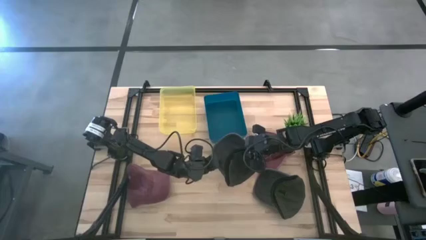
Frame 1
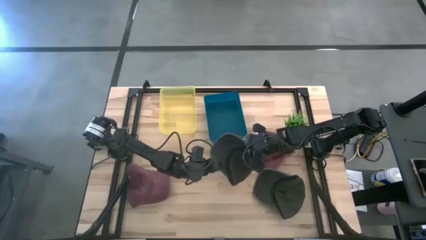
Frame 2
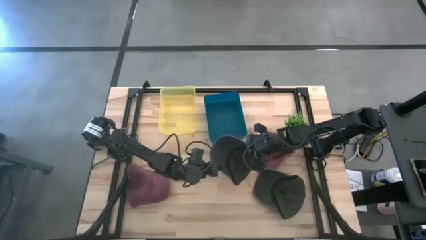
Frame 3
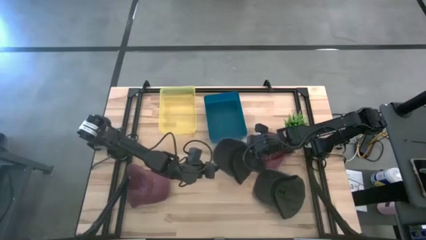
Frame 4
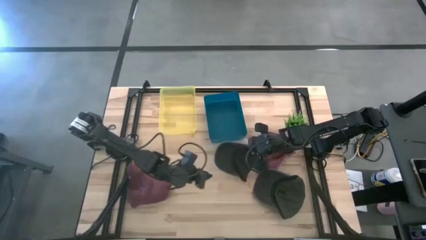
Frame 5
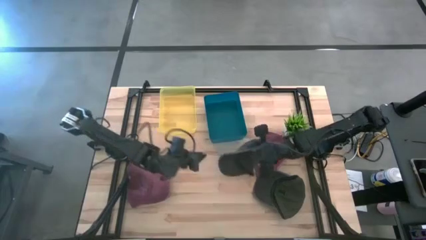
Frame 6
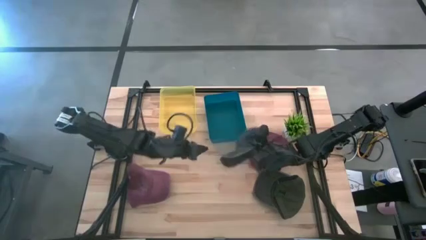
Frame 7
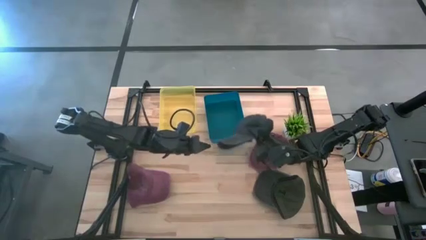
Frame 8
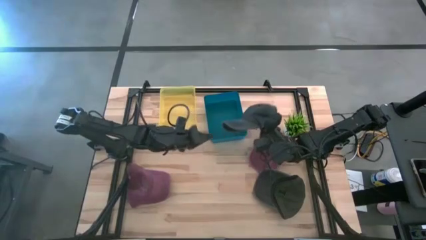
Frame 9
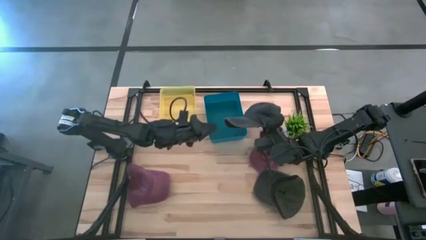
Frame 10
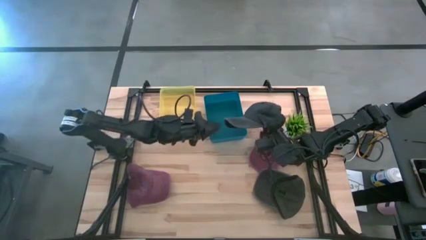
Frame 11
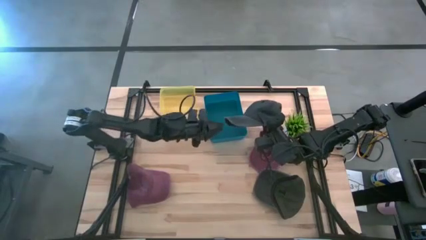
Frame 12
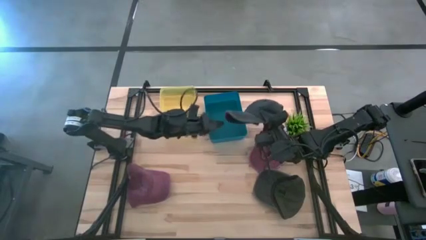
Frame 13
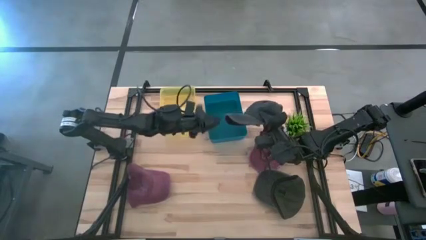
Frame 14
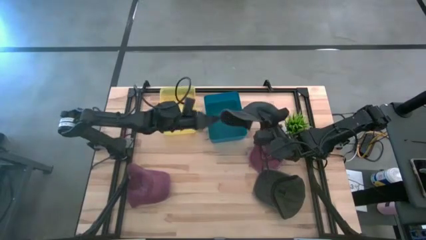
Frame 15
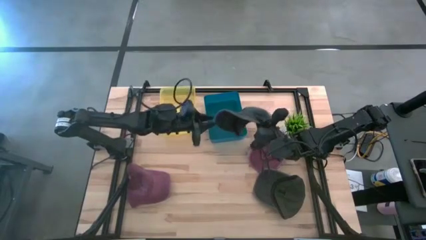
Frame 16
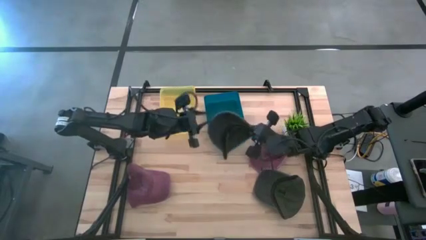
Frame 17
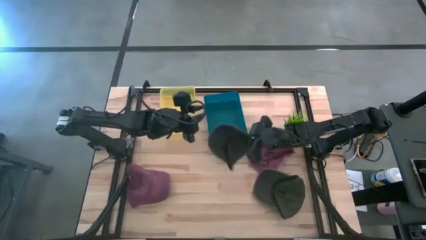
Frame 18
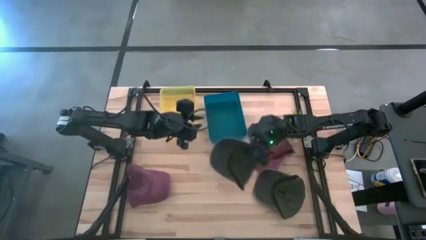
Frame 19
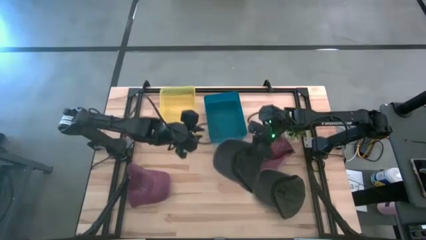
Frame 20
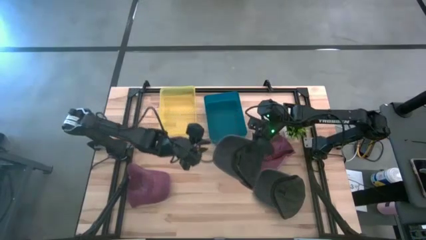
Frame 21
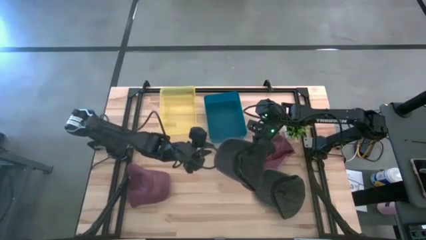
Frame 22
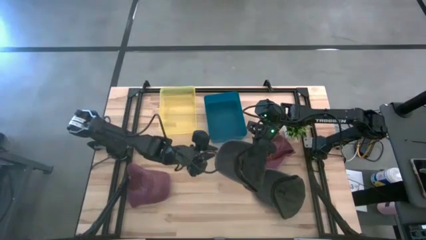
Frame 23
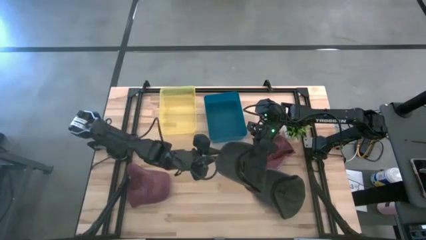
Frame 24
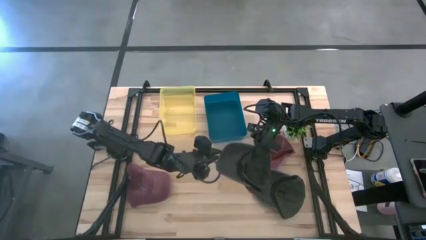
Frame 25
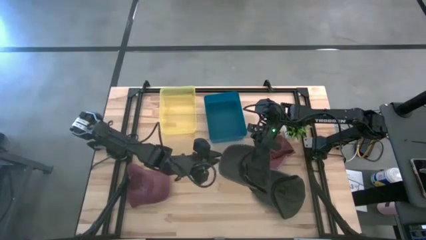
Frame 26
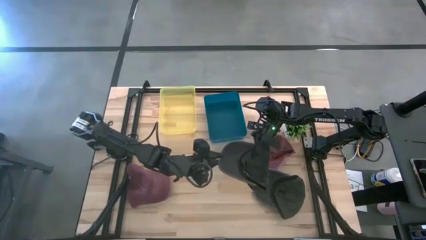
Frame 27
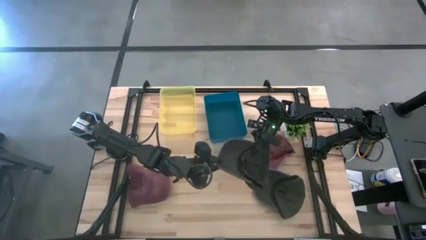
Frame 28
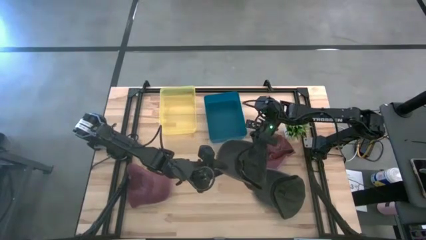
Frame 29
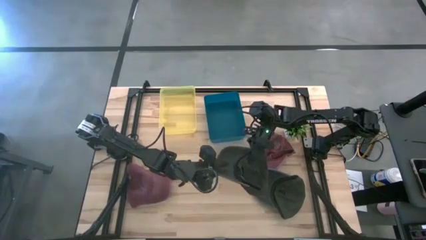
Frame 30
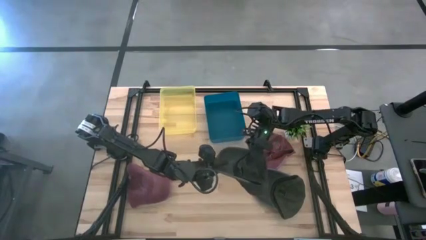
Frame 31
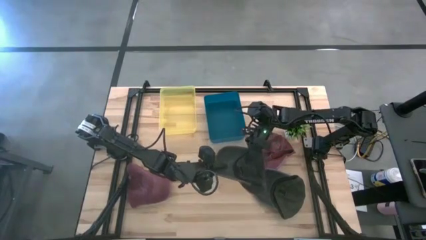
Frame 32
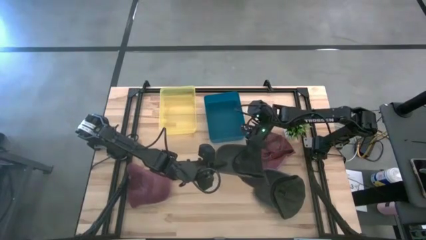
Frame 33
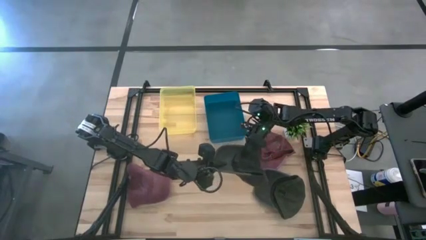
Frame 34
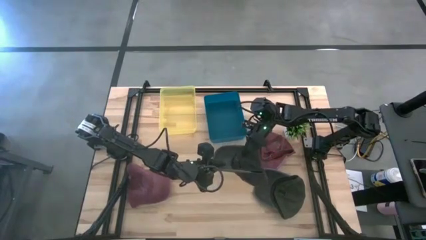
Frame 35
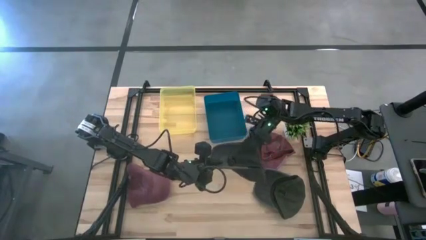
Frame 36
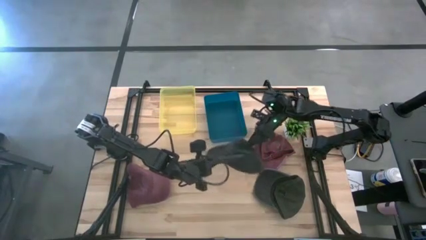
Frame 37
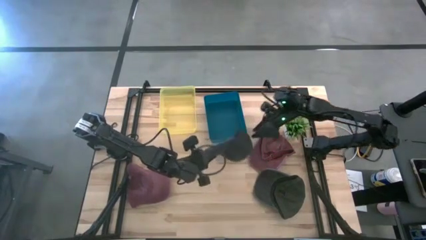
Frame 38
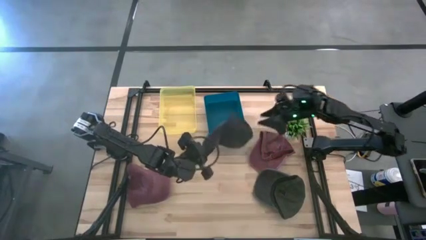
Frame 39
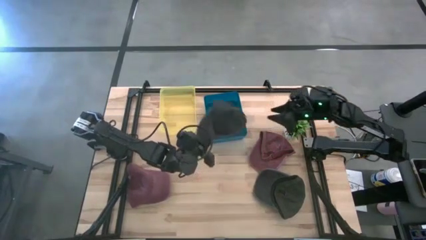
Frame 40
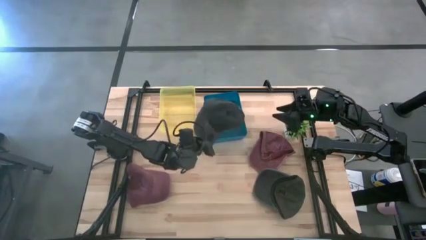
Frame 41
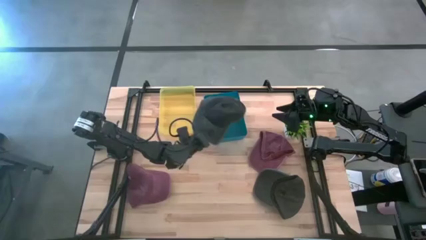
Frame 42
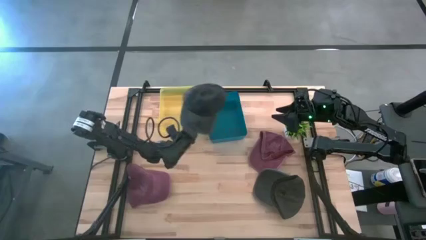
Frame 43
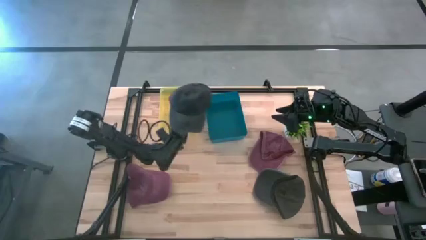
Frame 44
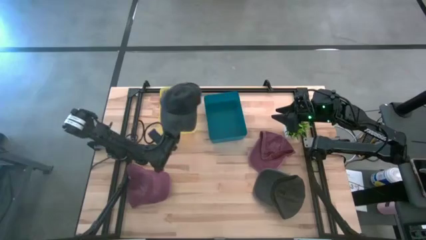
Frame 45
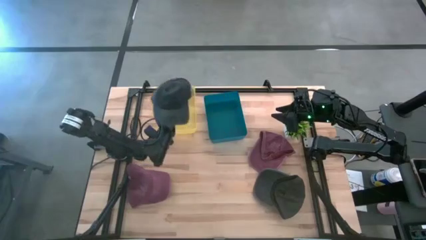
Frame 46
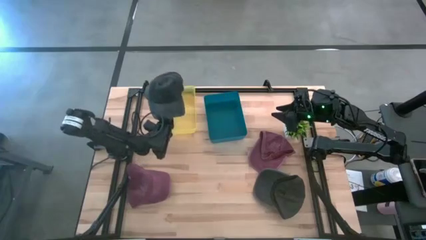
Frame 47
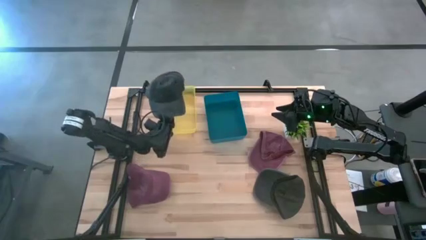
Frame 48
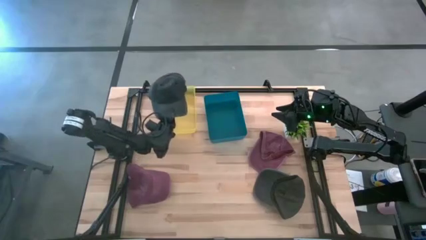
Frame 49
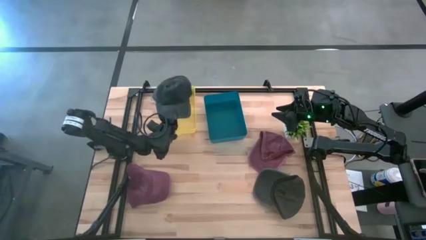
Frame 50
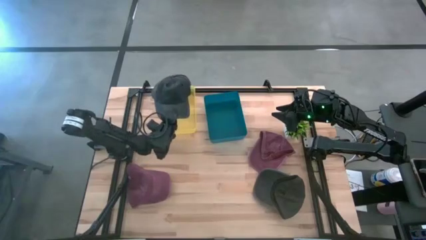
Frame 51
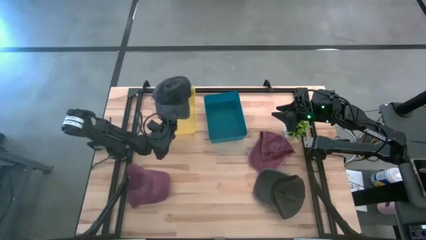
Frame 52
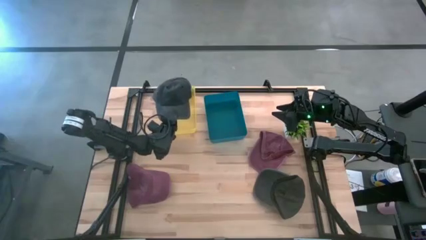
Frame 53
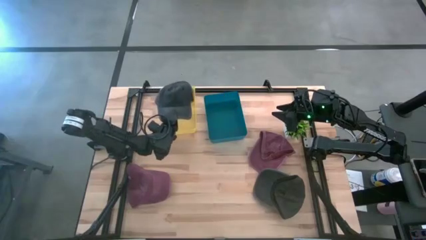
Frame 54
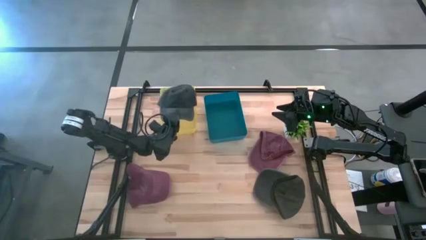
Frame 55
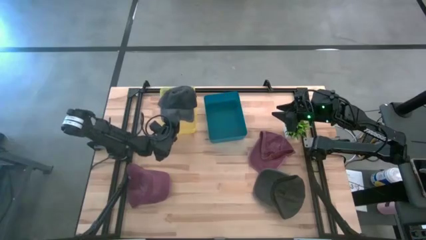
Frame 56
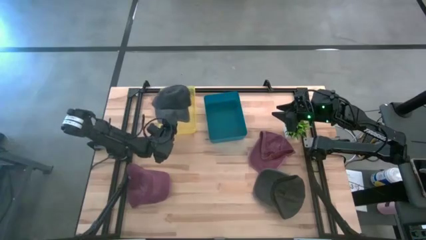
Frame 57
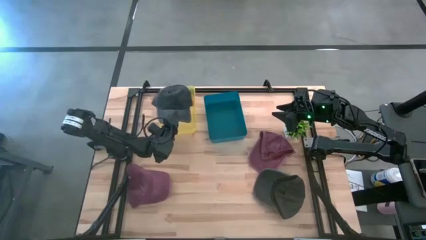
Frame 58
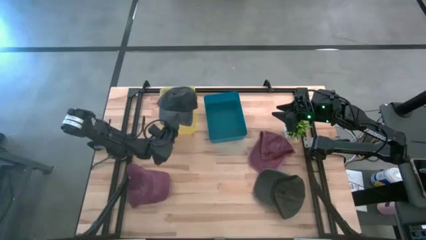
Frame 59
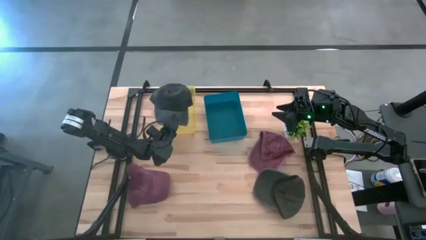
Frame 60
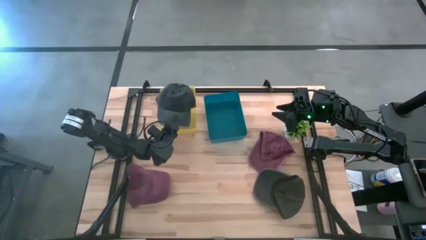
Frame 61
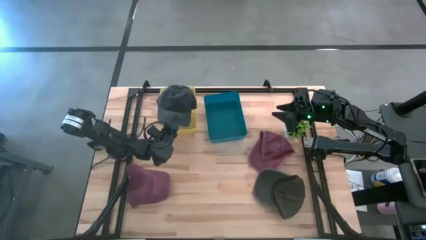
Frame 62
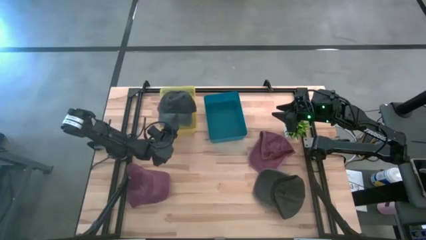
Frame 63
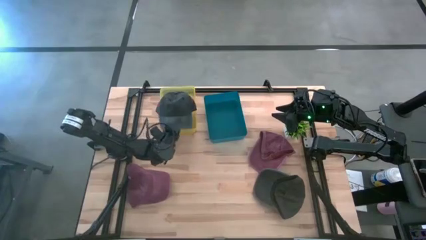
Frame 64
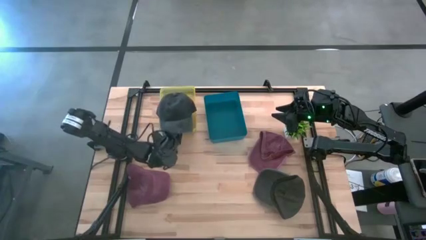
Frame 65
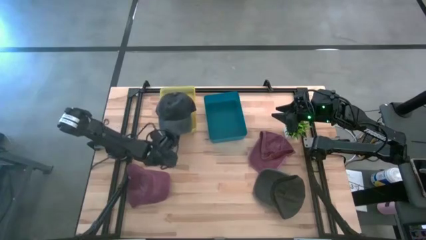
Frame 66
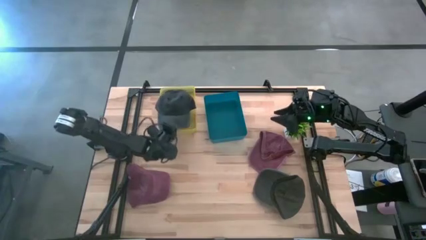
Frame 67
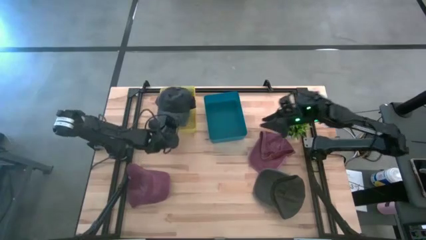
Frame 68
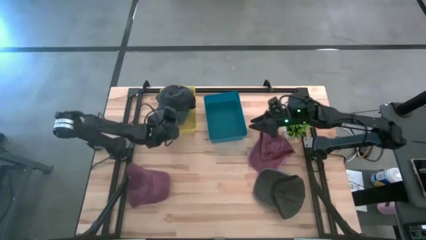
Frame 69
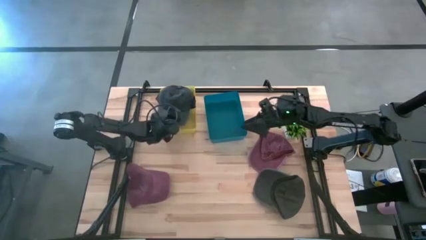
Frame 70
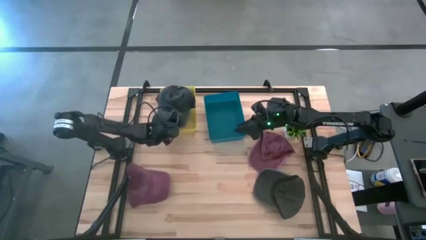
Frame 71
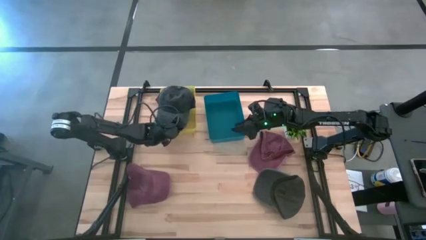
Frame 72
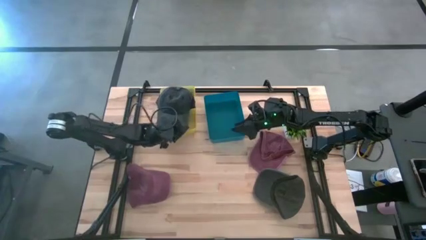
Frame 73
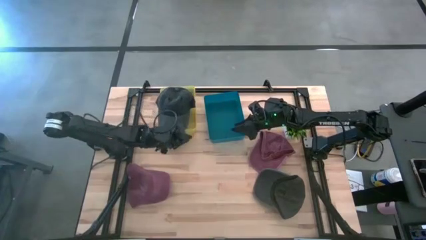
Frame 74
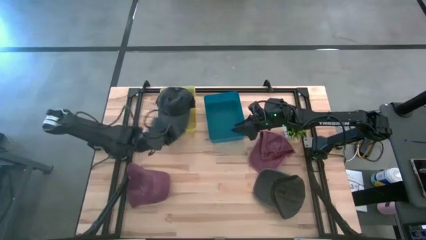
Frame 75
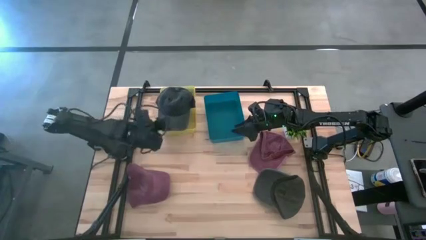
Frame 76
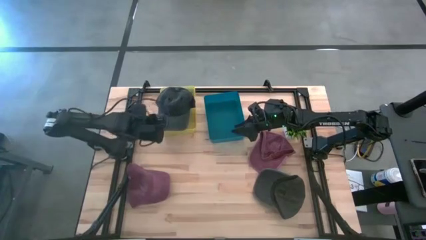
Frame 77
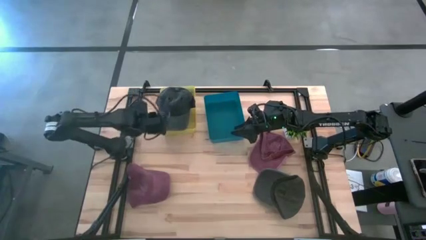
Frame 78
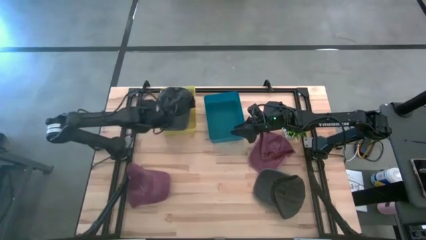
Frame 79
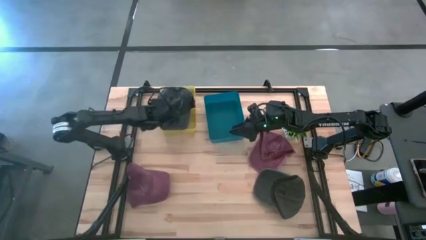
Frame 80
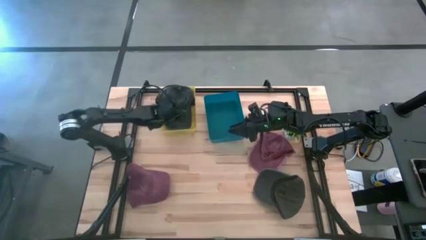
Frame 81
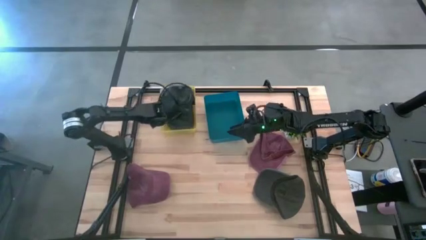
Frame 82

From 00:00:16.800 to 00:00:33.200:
Task: Pick & Place hat
Put the top black cap into the yellow bin
